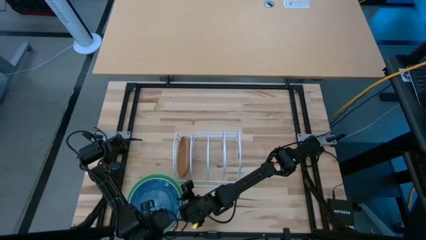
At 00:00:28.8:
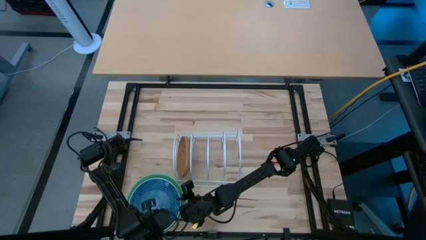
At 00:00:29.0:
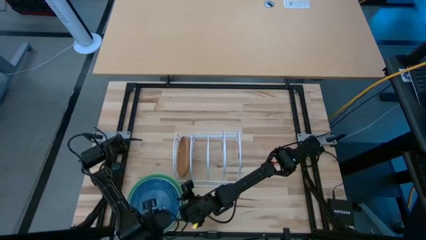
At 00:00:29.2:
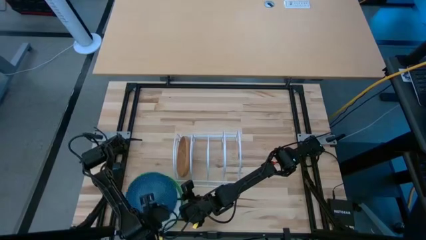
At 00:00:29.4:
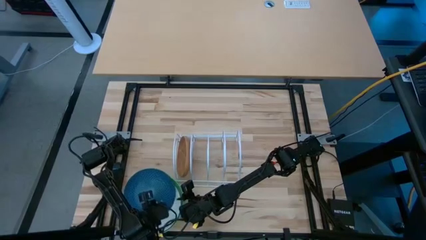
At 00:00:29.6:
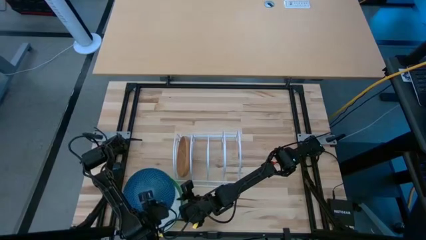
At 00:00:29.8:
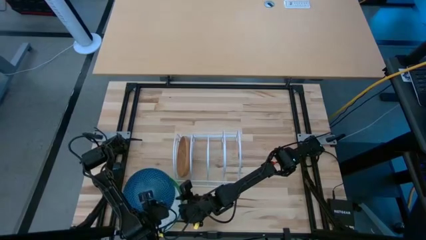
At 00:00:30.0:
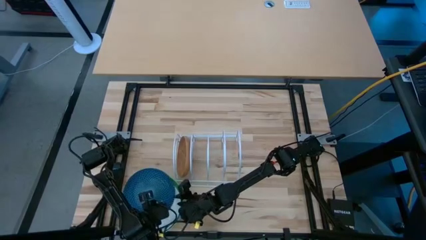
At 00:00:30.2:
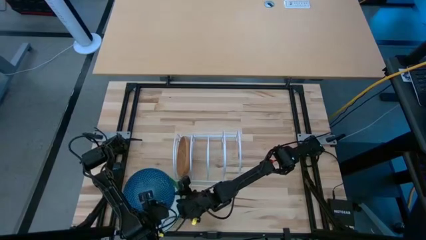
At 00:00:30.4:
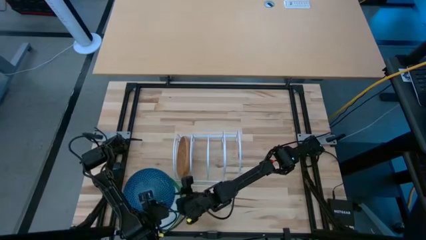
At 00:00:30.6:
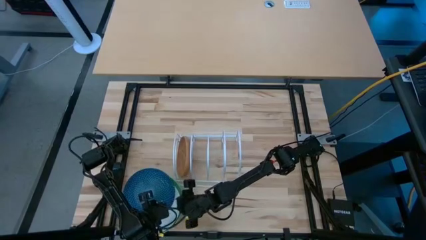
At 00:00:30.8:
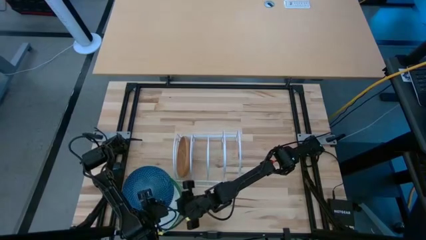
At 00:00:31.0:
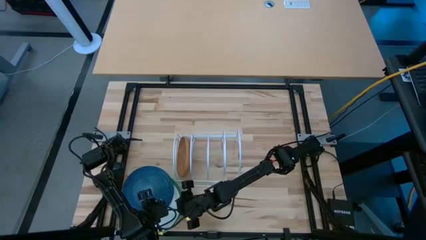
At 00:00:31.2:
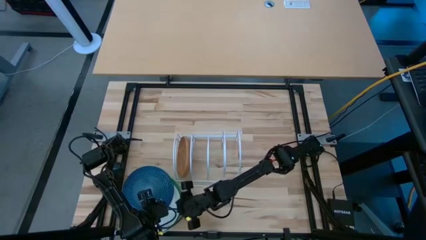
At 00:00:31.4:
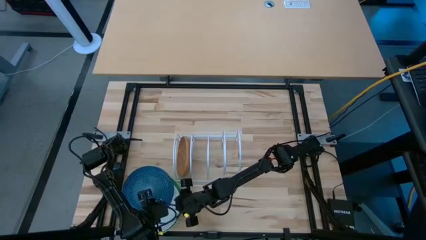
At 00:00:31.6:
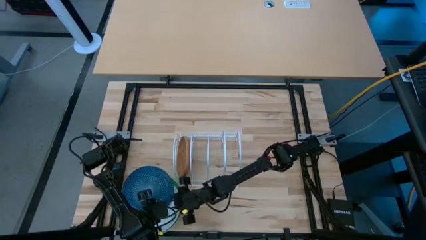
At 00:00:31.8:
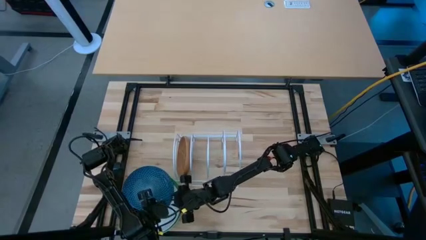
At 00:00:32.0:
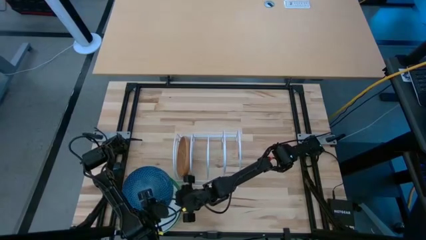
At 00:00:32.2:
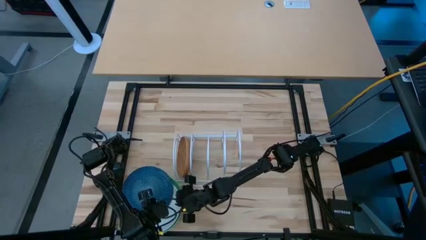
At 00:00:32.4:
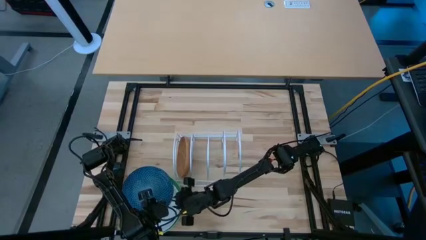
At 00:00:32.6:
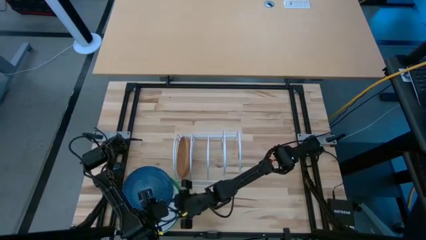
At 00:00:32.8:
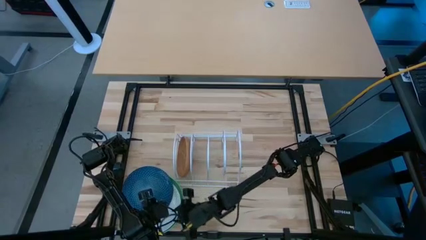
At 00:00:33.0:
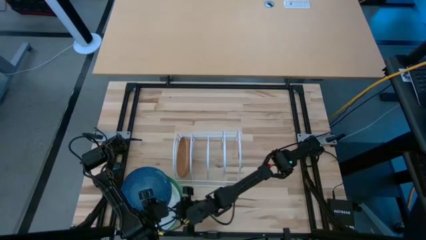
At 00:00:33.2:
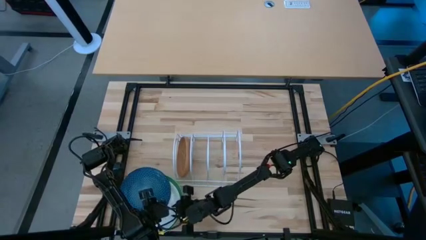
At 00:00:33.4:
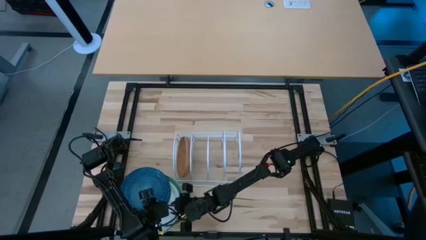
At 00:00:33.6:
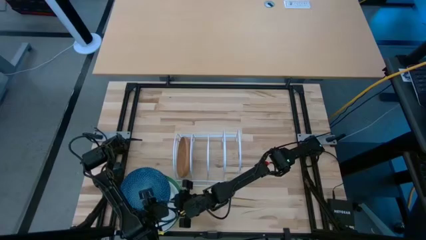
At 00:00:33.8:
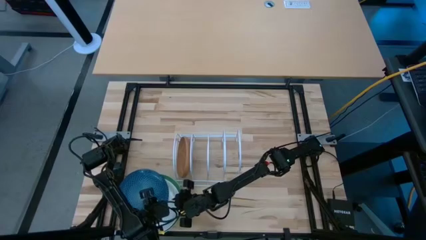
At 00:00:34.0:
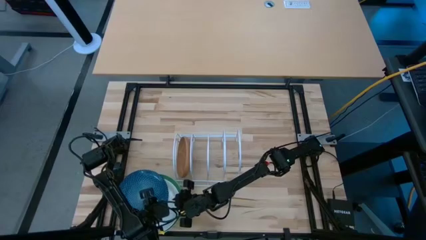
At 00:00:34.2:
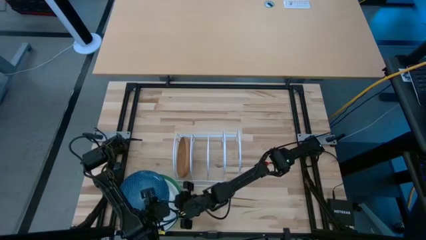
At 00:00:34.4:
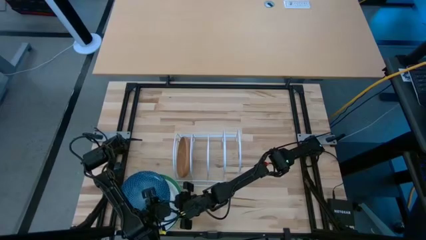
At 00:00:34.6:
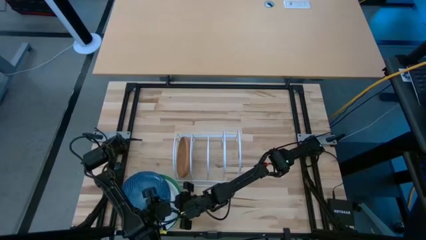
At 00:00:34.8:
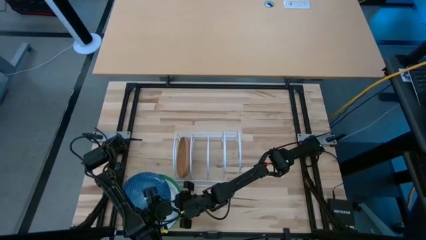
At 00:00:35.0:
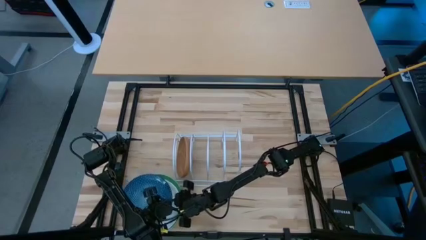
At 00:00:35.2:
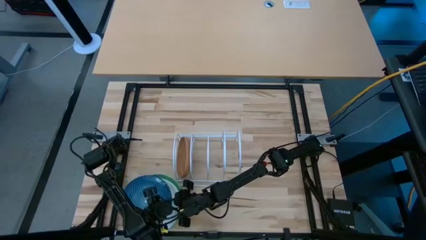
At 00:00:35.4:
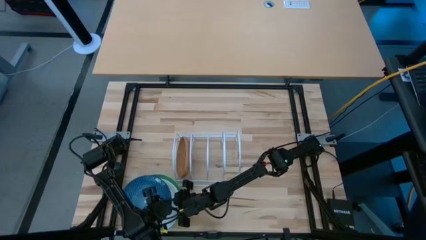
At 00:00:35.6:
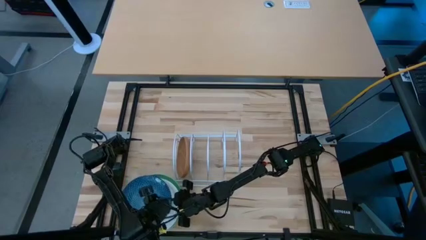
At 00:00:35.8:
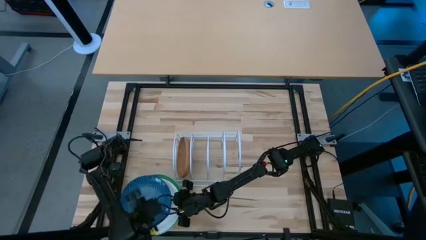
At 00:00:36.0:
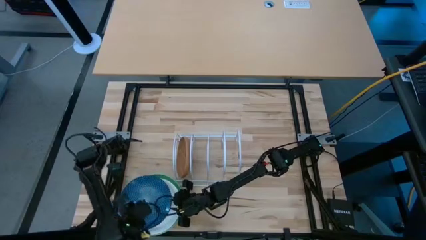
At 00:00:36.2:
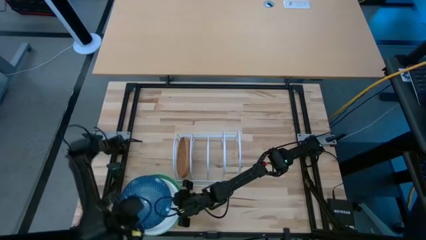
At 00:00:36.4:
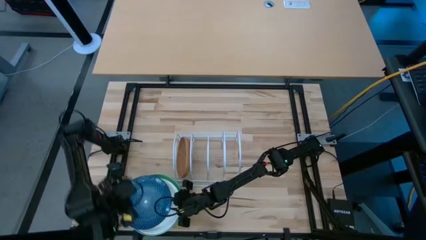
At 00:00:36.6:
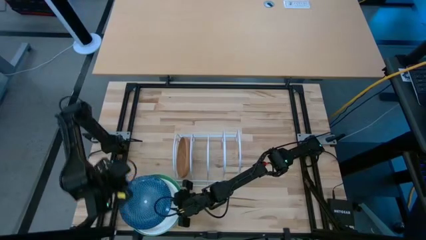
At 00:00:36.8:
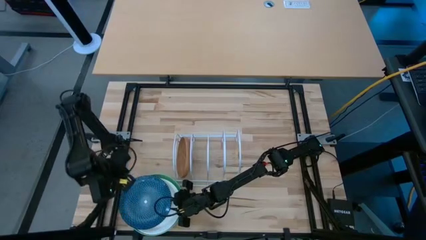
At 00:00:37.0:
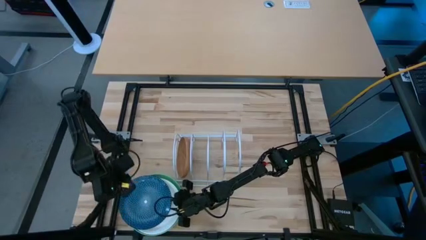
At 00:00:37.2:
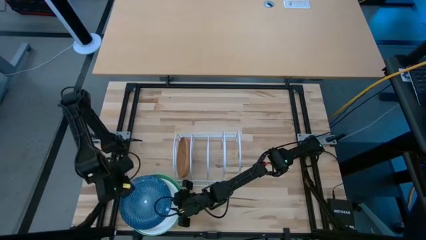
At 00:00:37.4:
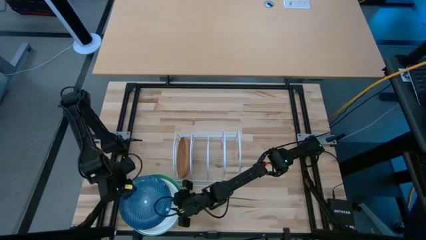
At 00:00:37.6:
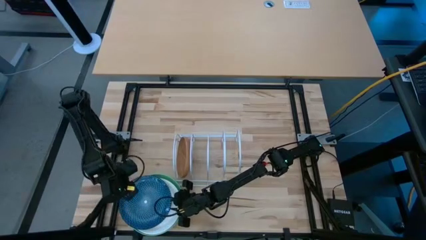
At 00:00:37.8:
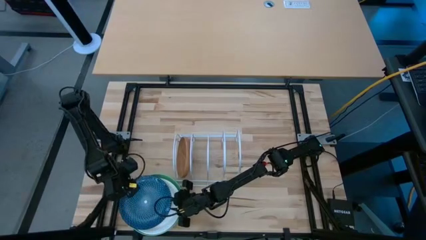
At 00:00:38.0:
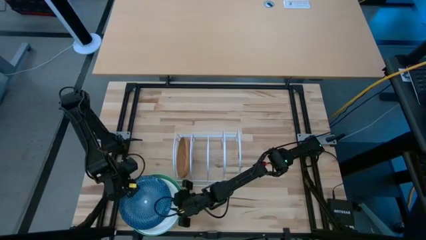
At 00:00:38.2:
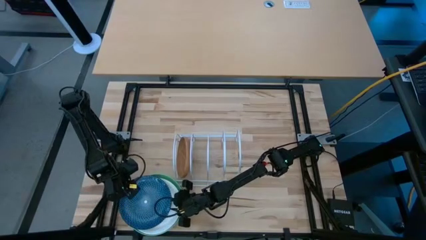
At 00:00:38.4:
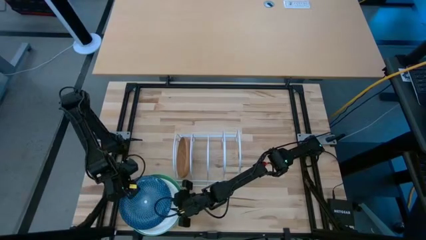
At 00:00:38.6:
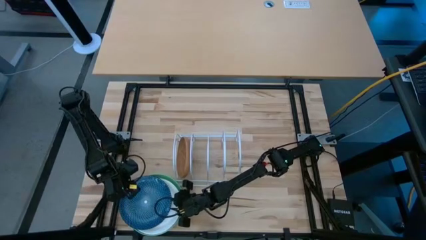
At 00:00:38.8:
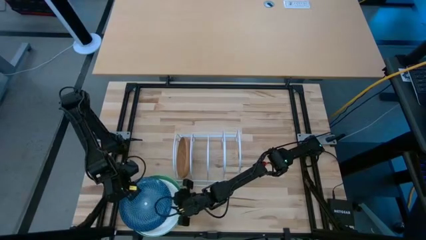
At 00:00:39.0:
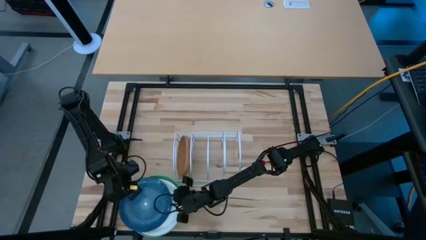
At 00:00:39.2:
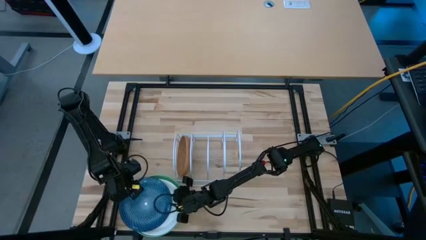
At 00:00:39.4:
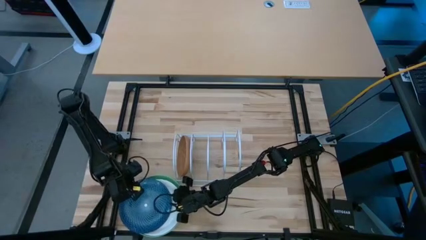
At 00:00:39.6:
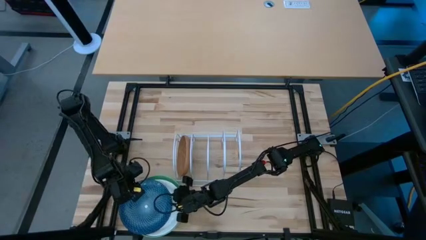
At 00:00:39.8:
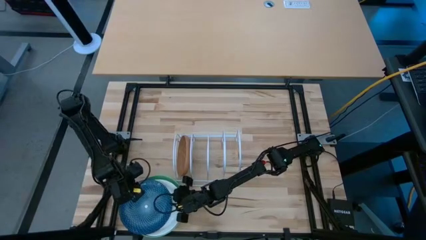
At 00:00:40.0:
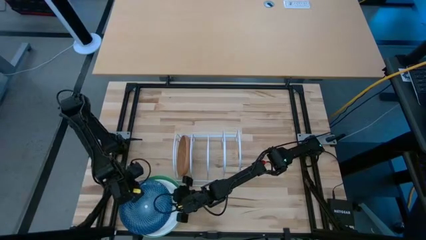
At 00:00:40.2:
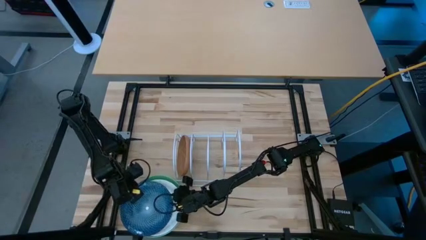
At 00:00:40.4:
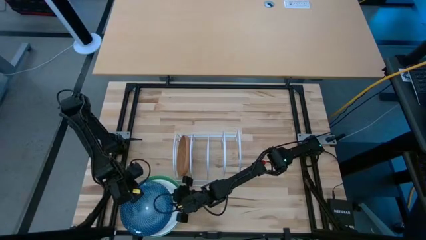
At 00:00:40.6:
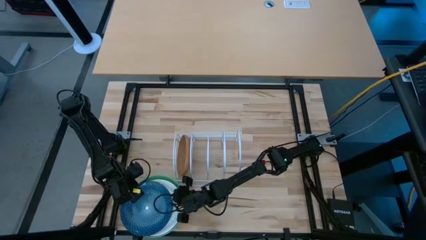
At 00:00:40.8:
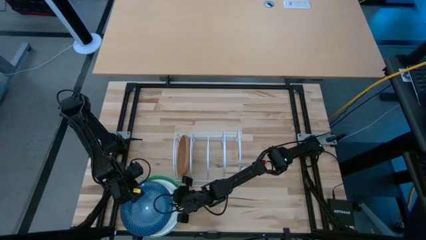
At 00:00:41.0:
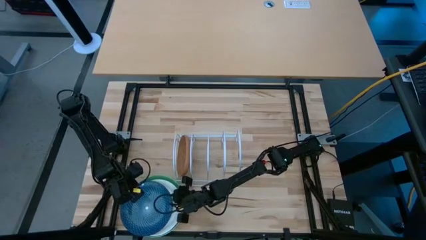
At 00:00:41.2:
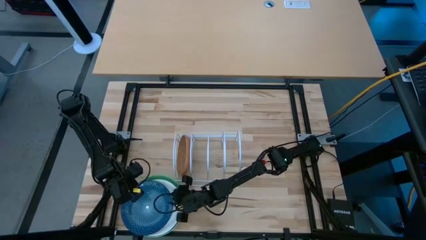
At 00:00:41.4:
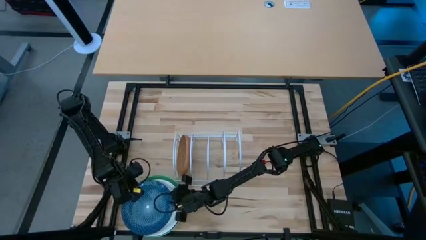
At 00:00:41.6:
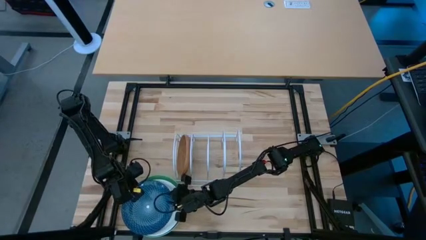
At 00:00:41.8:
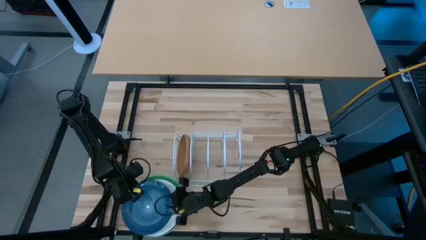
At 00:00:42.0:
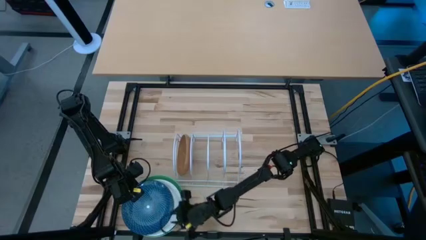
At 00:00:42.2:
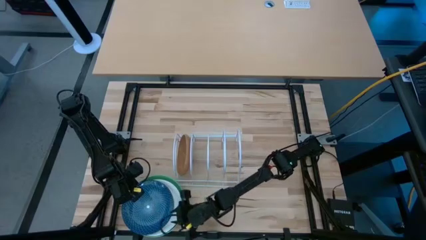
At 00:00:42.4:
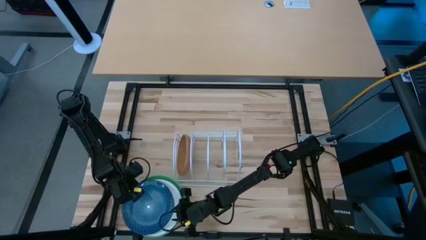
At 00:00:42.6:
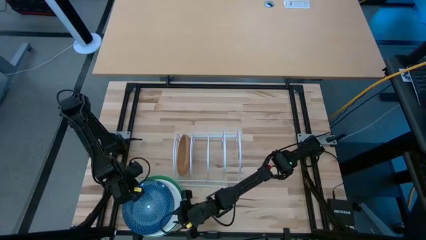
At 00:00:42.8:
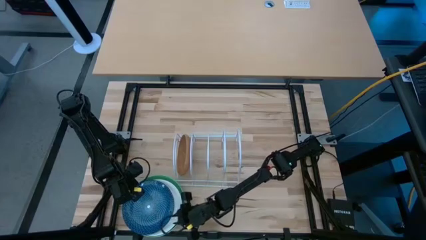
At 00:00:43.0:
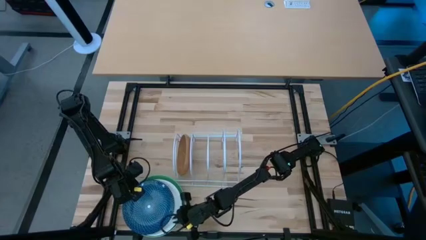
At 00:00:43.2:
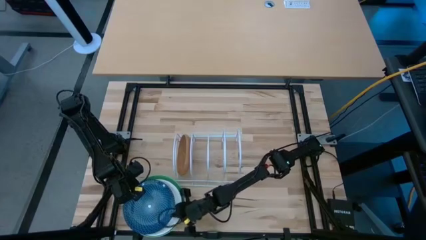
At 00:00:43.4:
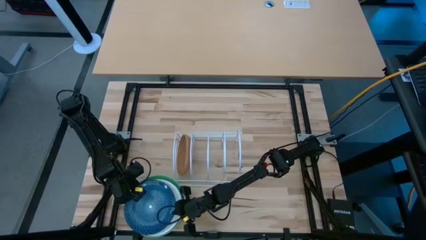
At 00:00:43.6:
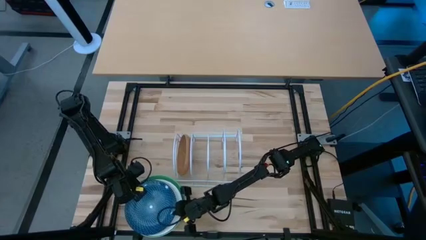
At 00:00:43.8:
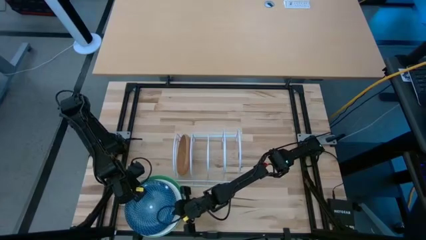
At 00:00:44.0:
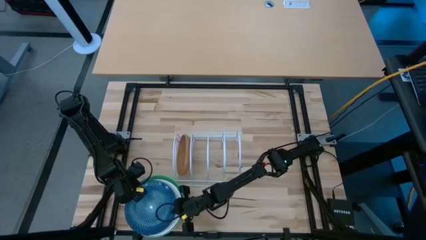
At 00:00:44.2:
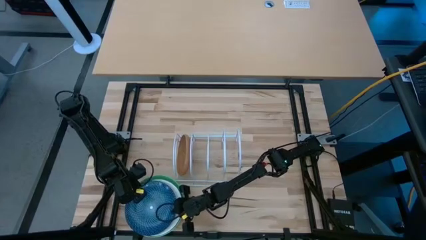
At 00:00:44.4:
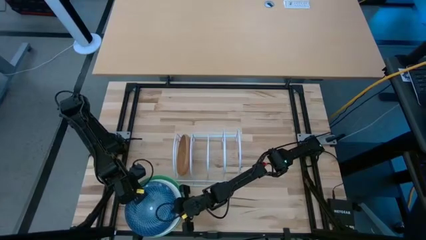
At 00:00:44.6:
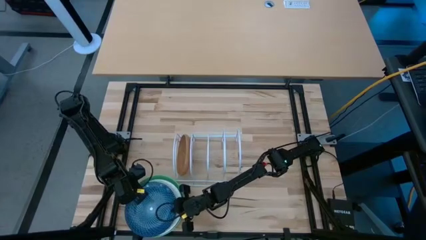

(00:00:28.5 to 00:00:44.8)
Task: Sort dishes
Put the blue plate into the dish rack
